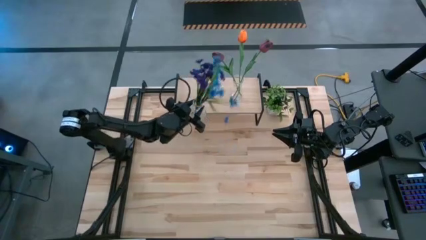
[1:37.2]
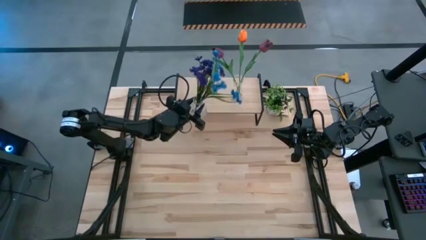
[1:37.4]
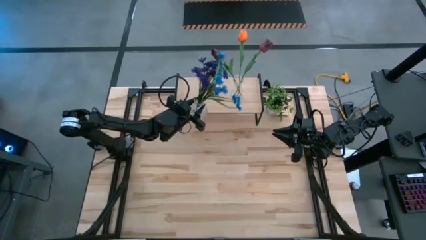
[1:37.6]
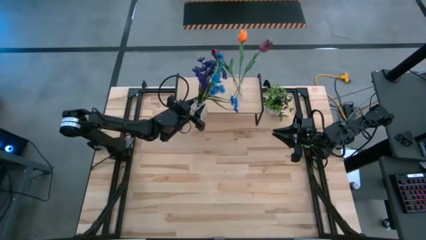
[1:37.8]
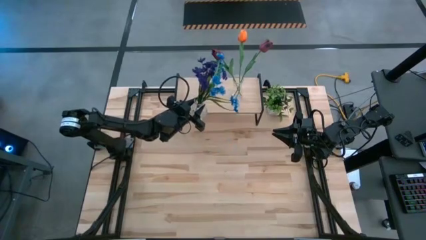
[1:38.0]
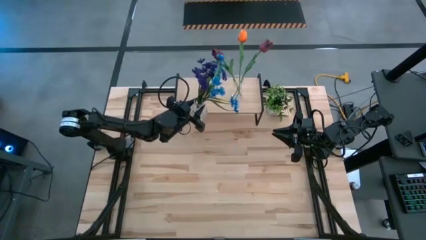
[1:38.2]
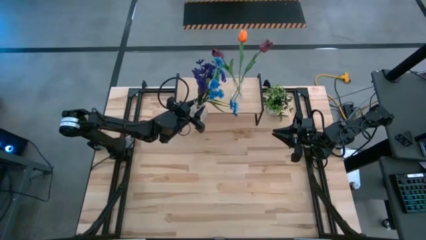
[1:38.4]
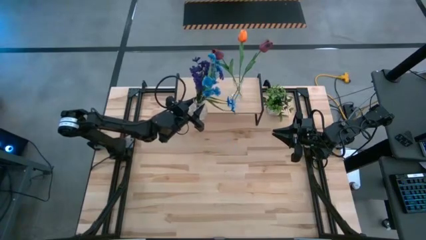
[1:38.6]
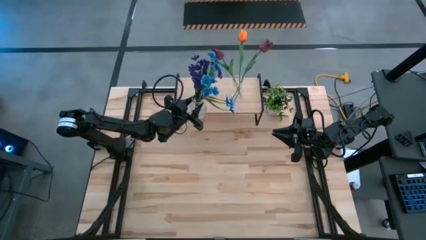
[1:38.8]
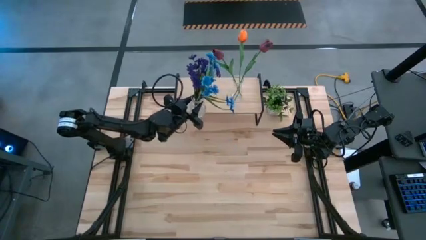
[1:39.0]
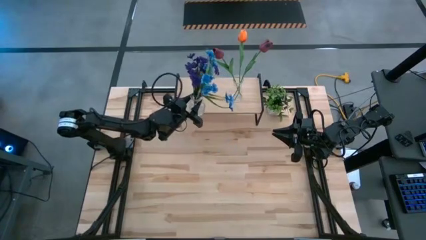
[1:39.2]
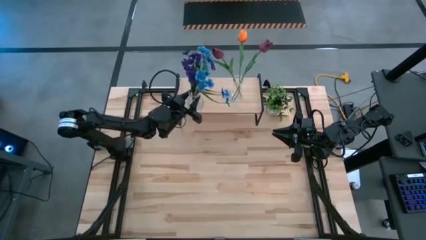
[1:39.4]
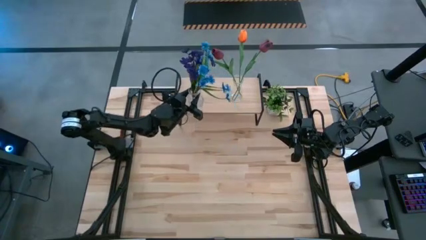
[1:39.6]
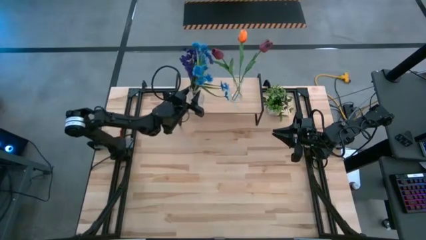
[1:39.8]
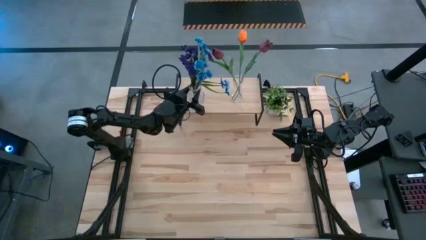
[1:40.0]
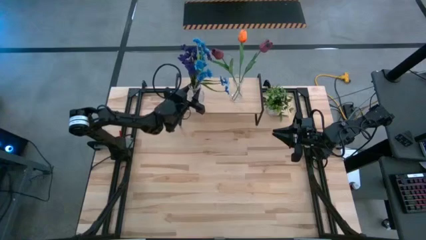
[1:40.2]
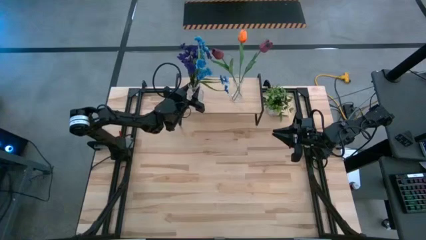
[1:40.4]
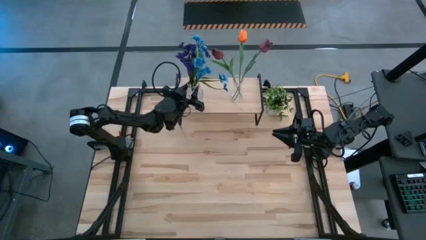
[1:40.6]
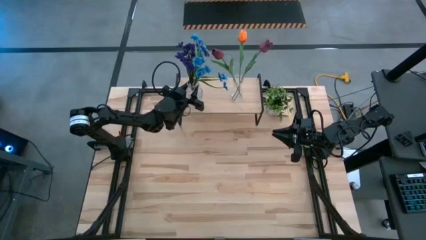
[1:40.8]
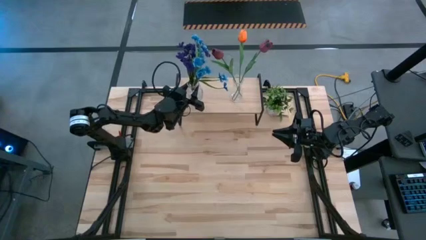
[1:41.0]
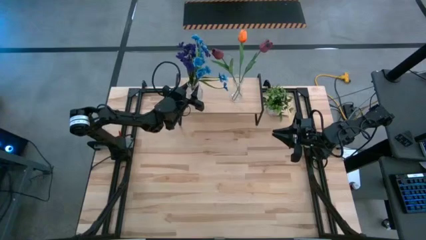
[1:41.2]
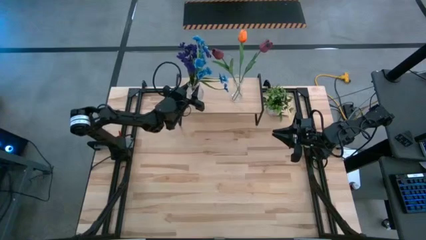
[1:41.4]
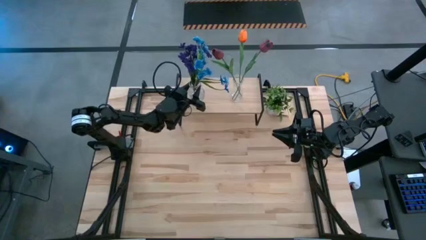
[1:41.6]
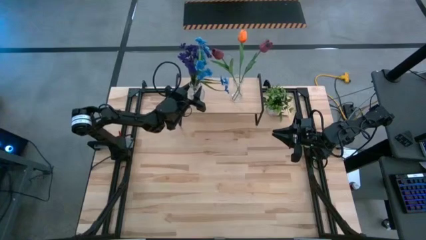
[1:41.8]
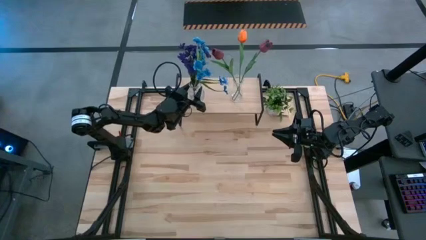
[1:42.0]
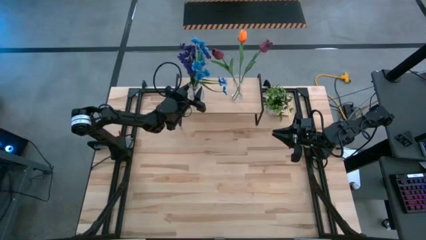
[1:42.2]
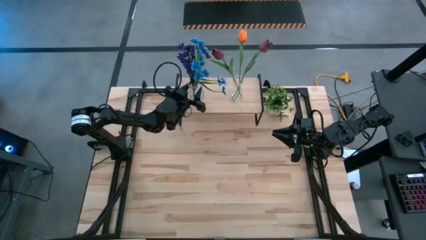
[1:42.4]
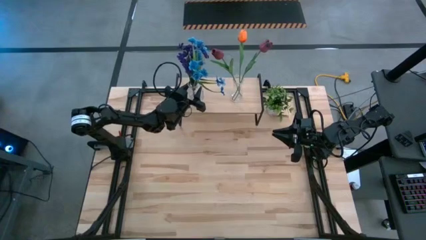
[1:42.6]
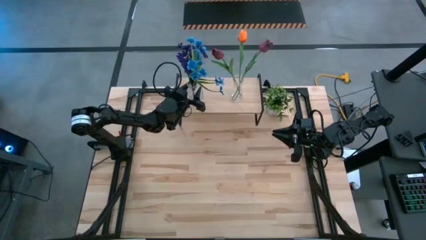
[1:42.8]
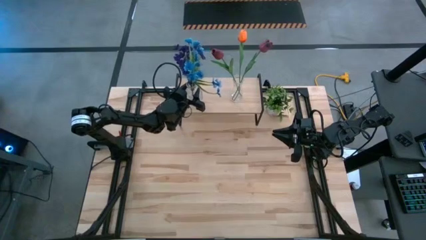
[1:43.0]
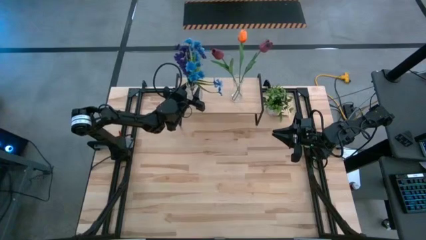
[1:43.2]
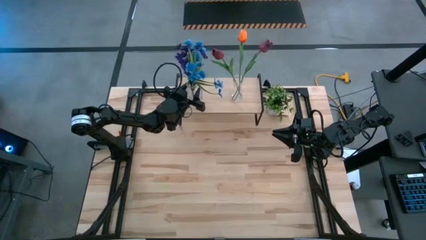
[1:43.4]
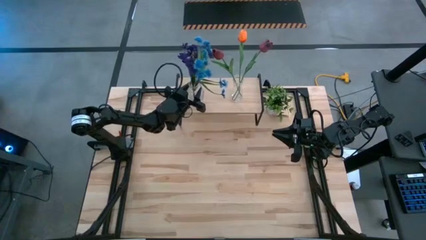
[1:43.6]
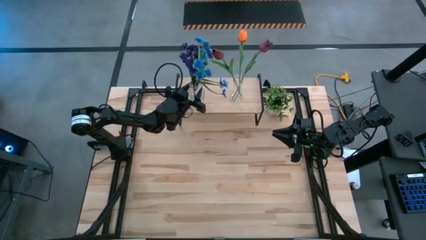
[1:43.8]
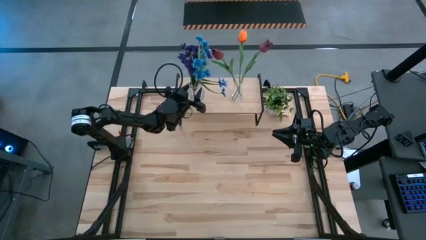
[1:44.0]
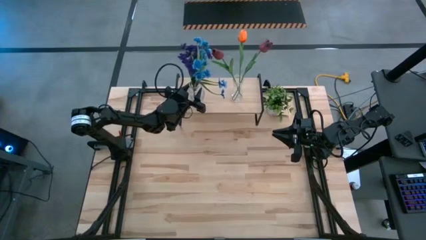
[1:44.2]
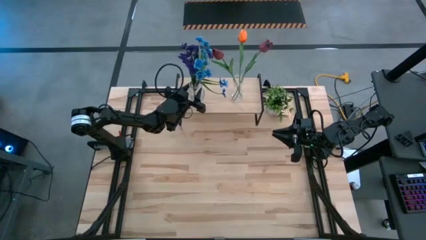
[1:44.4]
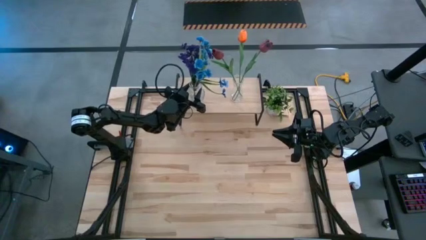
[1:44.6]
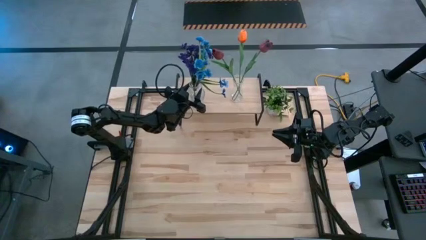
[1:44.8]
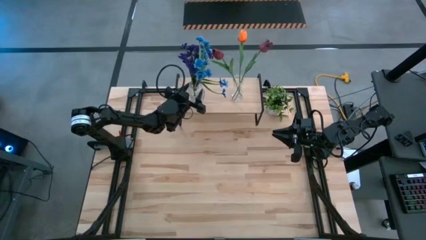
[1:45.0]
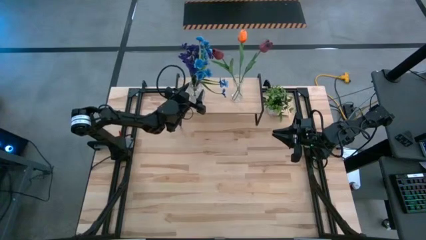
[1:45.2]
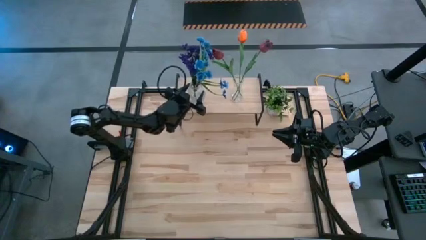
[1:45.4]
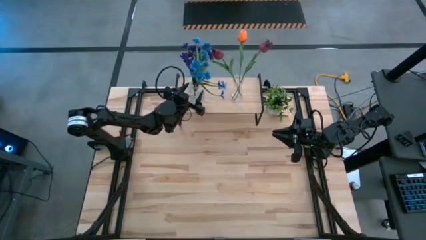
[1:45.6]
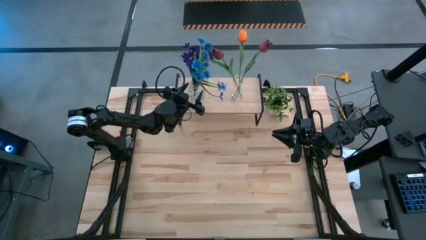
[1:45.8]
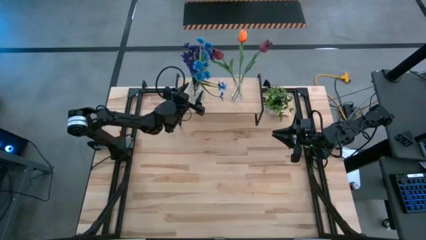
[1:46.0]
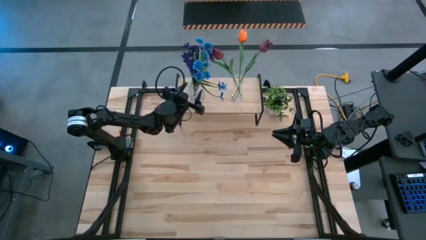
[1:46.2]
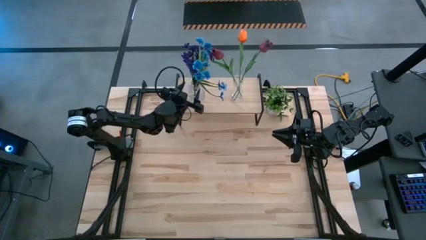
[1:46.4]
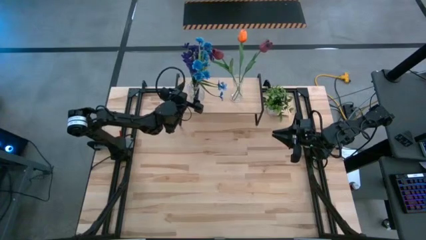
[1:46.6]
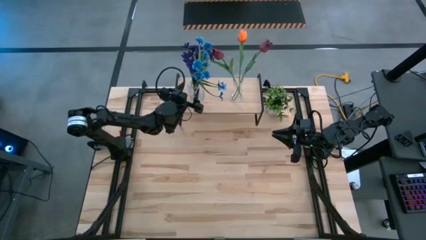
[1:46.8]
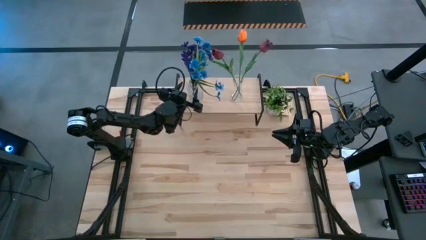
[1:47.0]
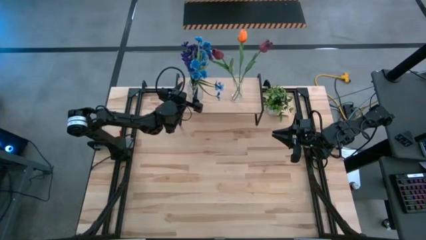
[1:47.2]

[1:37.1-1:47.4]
Task: Pick and place flowers into a vace then onto a shelf
Put the left transparent vase with flowers on the shelf
